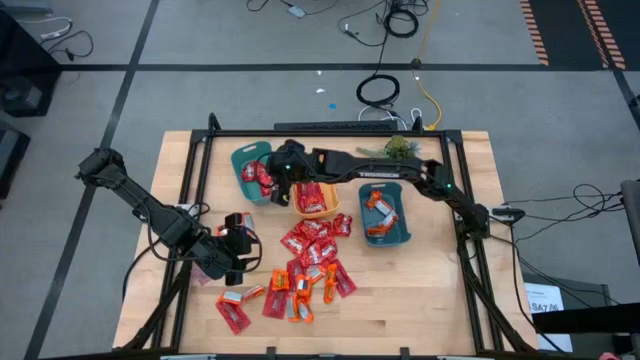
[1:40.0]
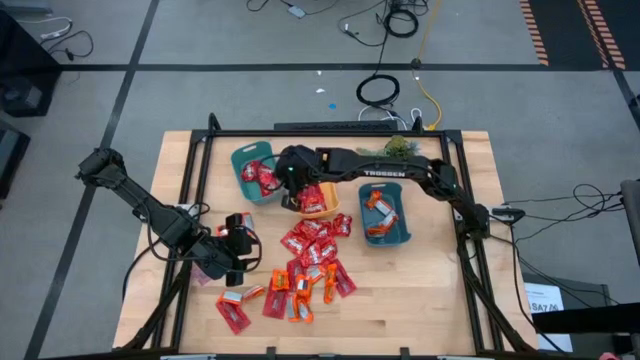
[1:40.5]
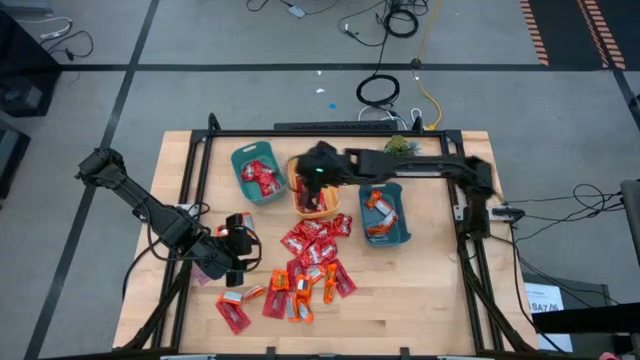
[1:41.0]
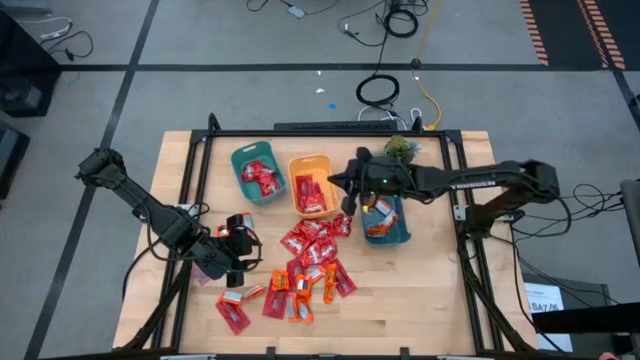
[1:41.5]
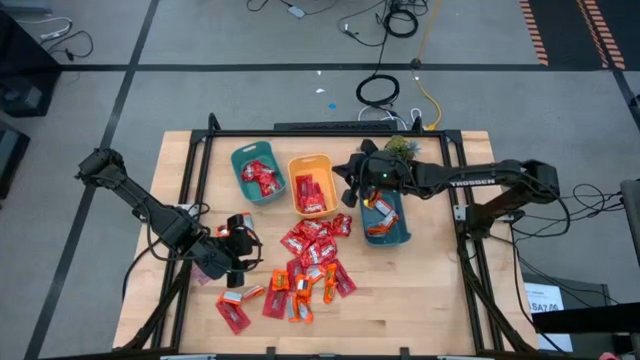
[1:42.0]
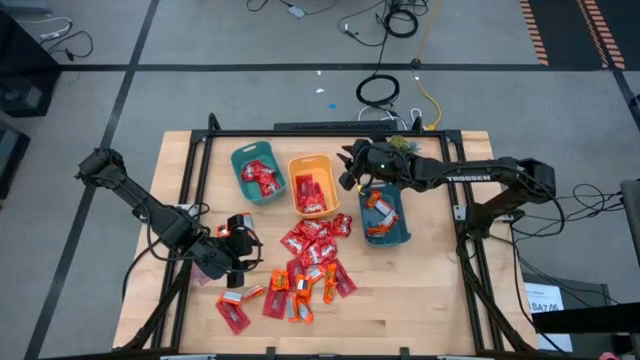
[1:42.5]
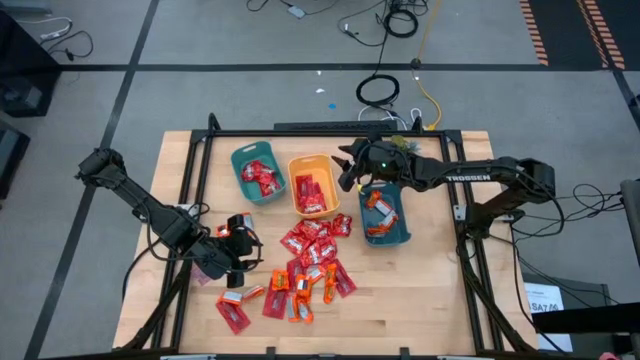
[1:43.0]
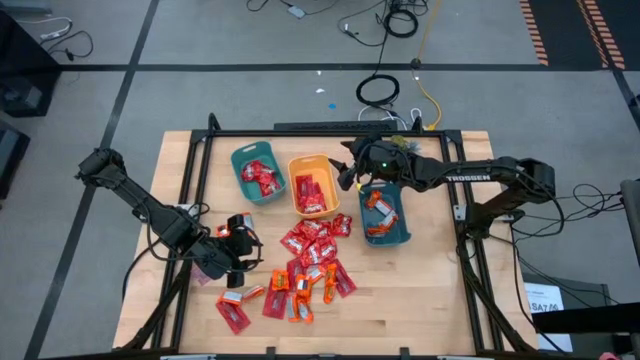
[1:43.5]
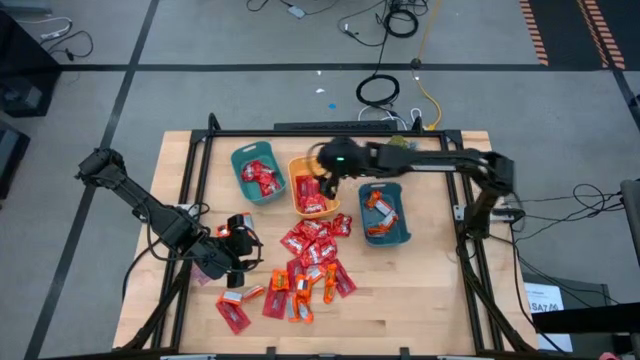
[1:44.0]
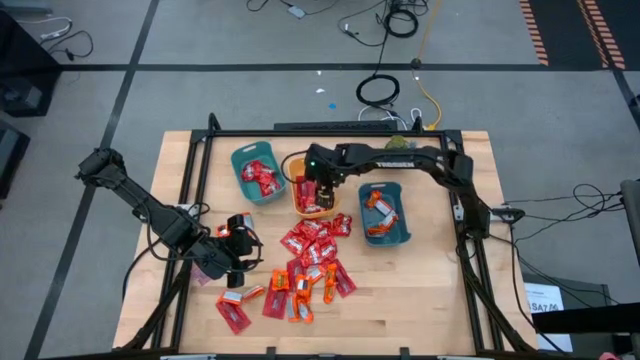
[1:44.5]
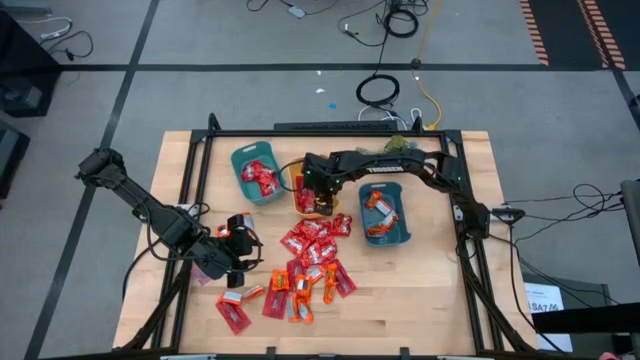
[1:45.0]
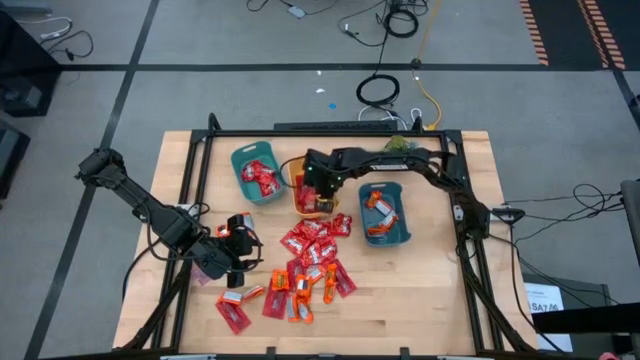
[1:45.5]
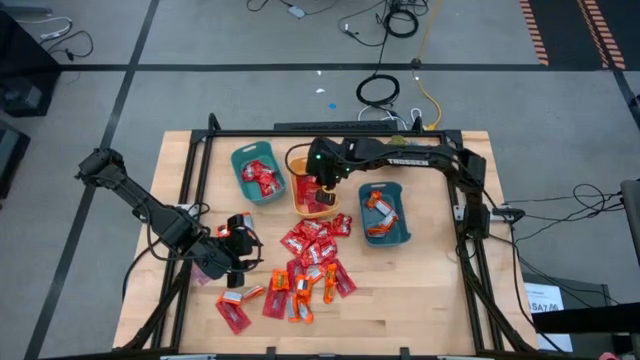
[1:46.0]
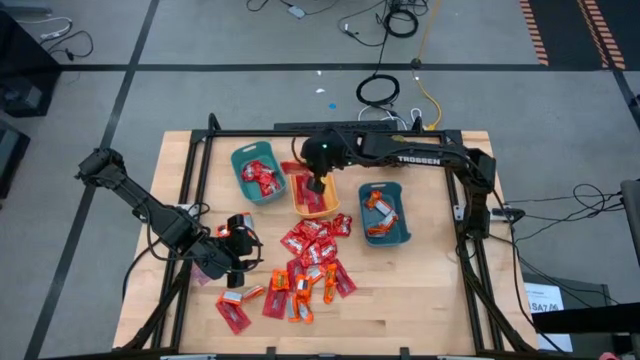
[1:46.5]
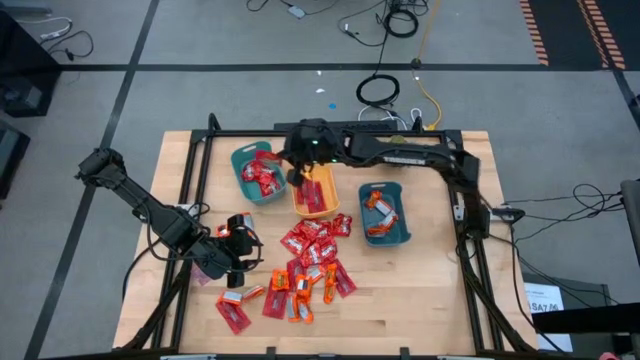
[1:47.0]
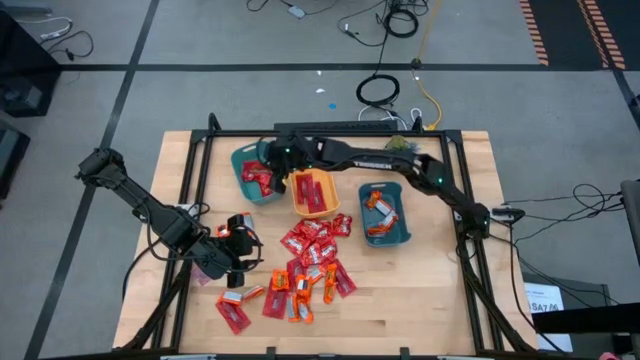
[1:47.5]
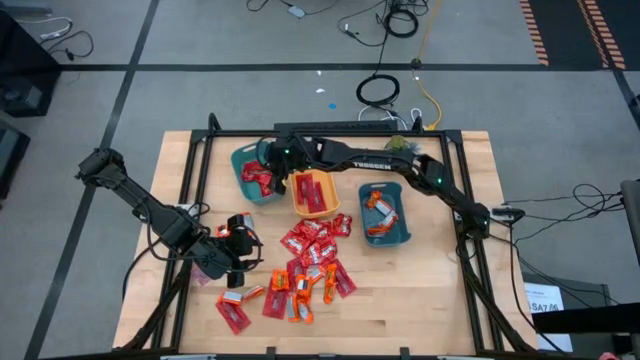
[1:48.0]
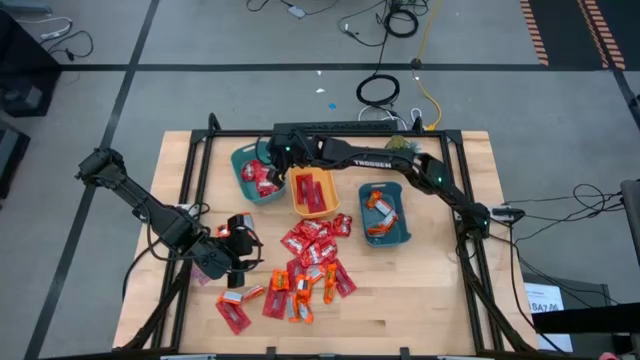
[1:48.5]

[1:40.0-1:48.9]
Task: Sort candy
Put the red pack of candy into the light blue bin

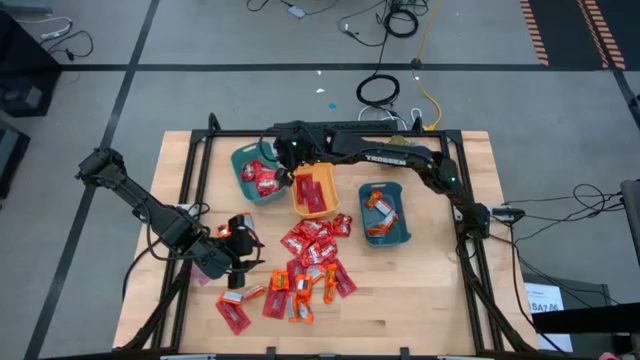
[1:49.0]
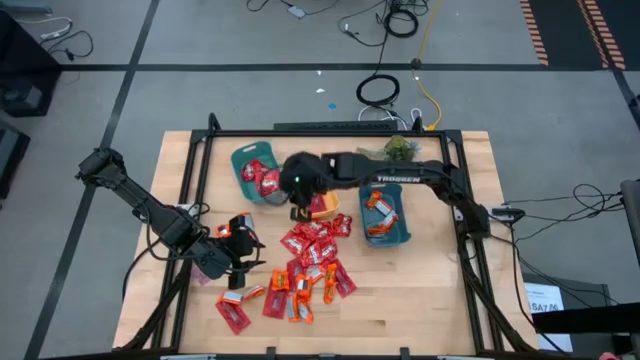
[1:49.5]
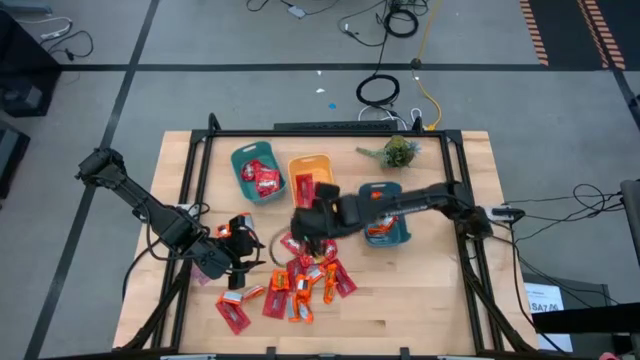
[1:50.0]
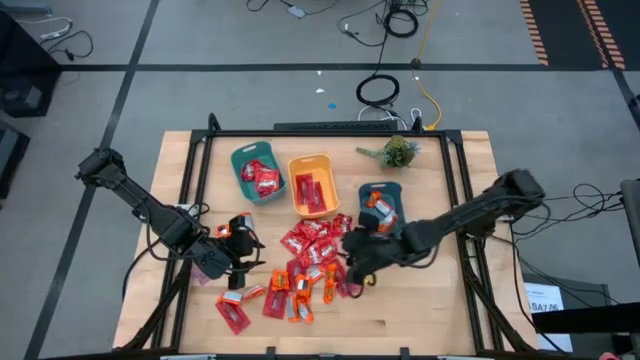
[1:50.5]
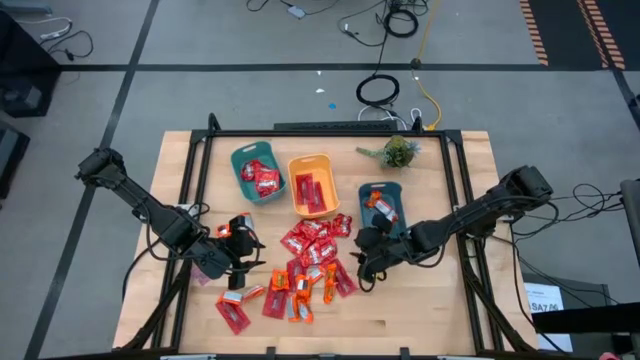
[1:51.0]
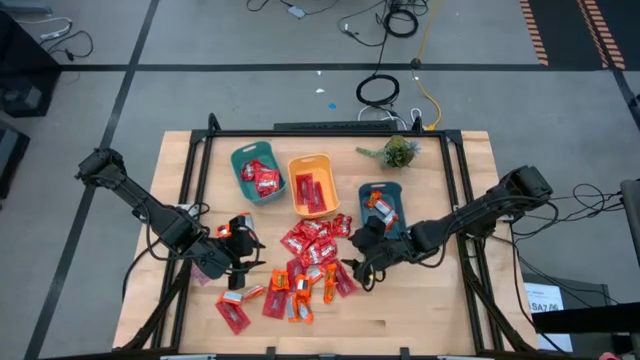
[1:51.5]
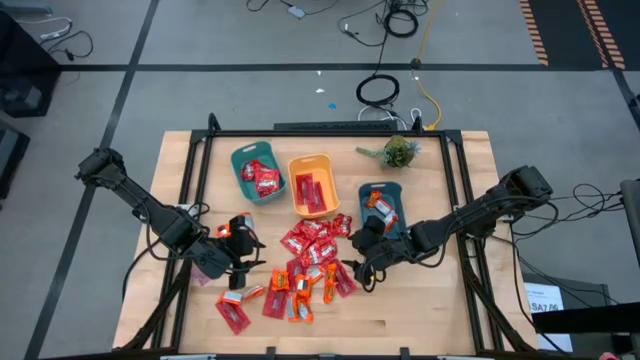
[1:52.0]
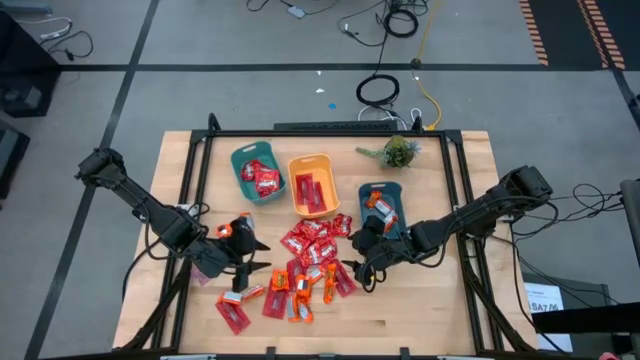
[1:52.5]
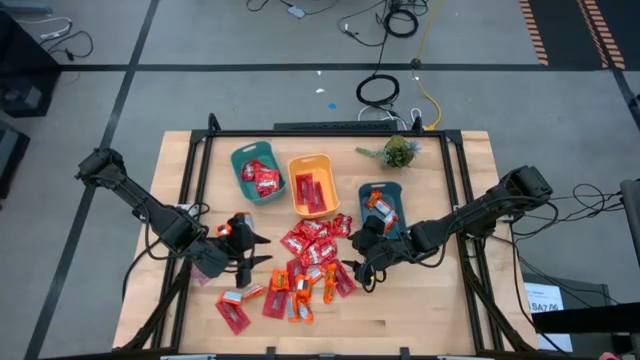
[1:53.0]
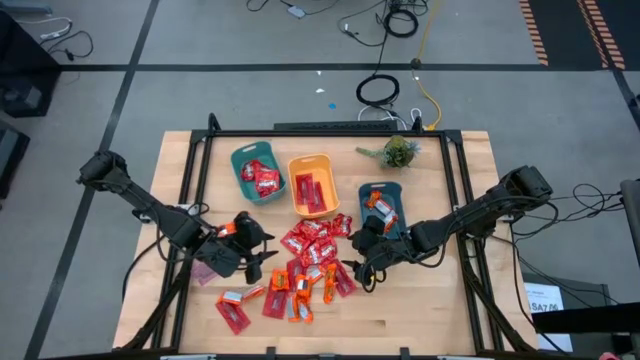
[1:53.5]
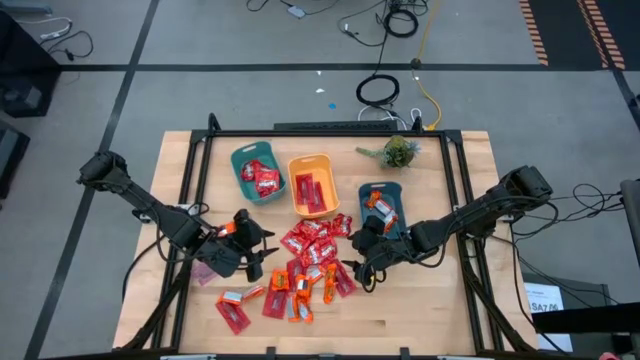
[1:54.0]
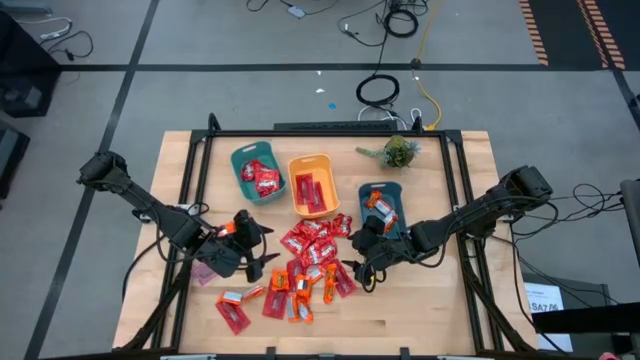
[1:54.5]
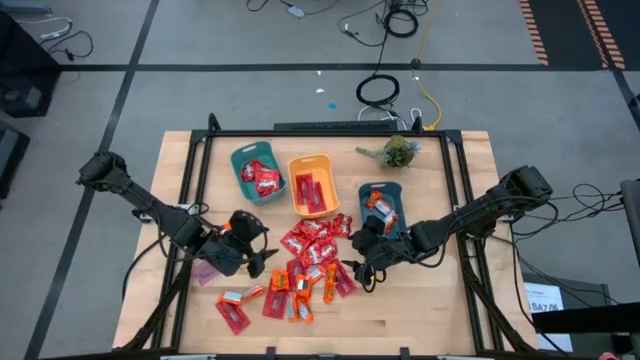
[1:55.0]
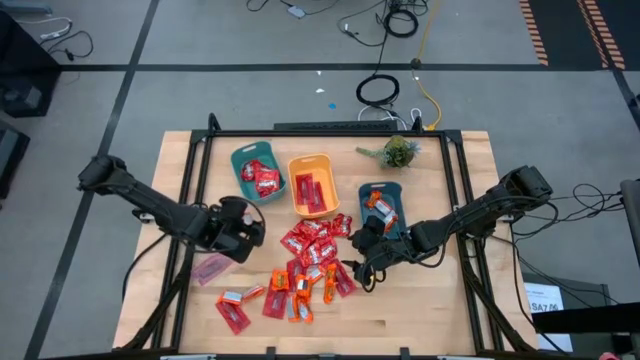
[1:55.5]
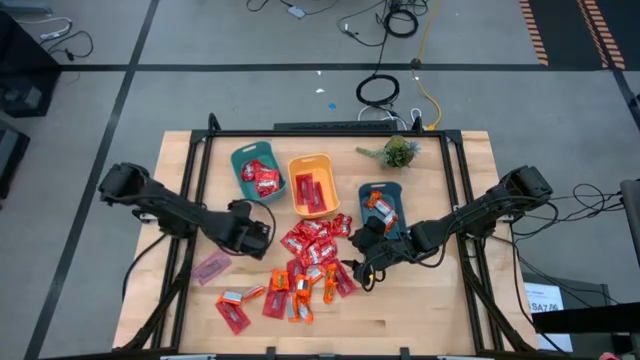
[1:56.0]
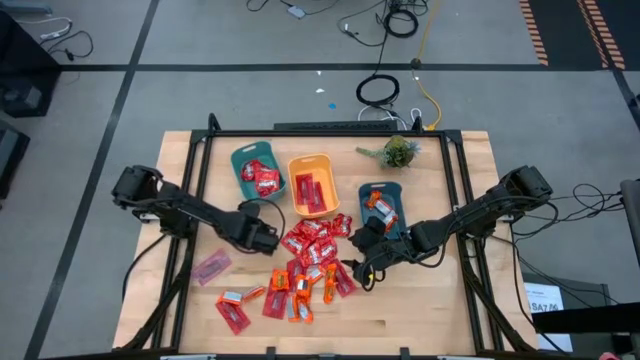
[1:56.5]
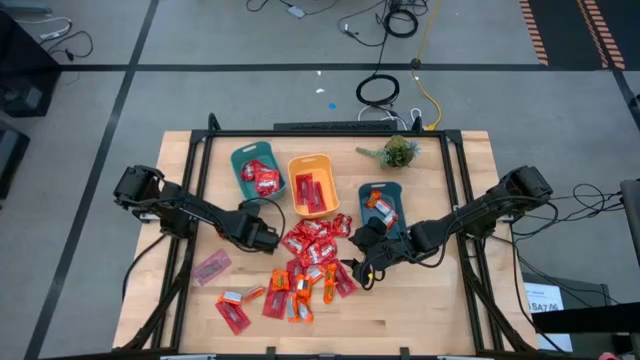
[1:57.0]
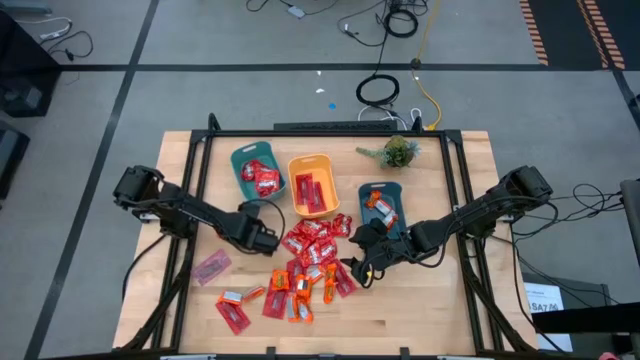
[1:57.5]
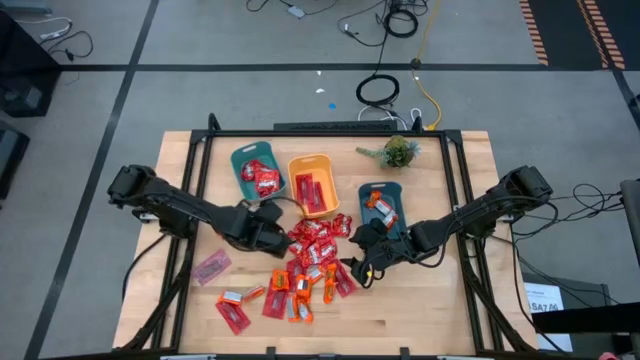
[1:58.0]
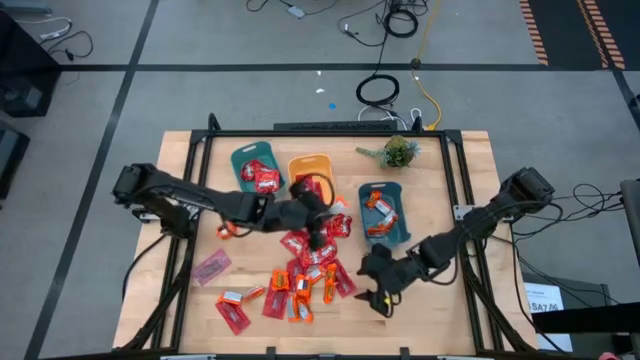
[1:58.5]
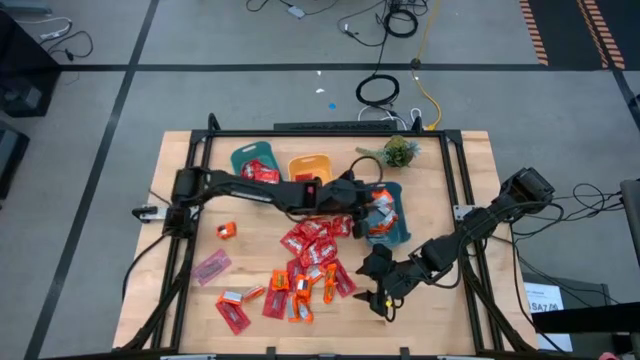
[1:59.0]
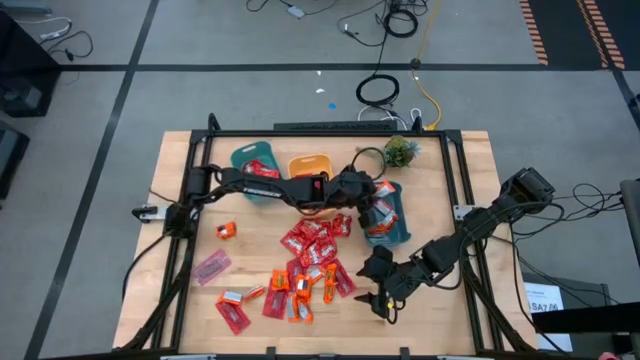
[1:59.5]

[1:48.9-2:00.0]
Put the orange wrapper chocolate into the dark blue bin
